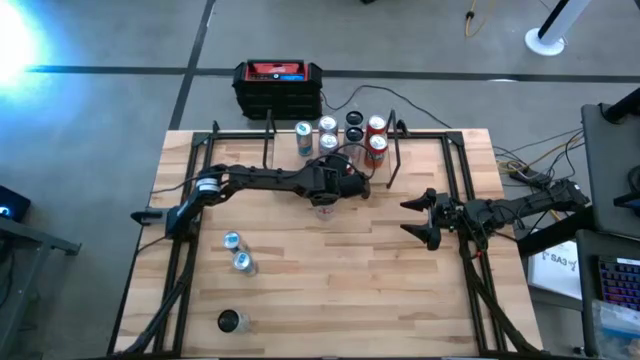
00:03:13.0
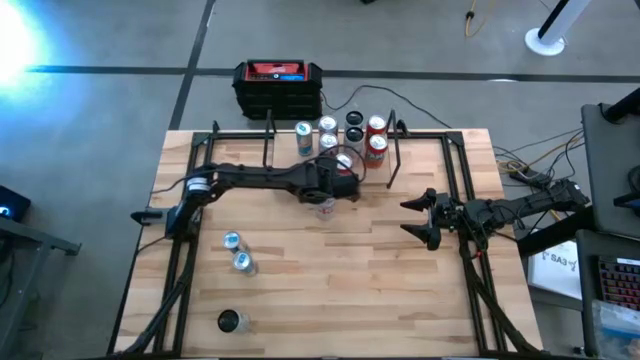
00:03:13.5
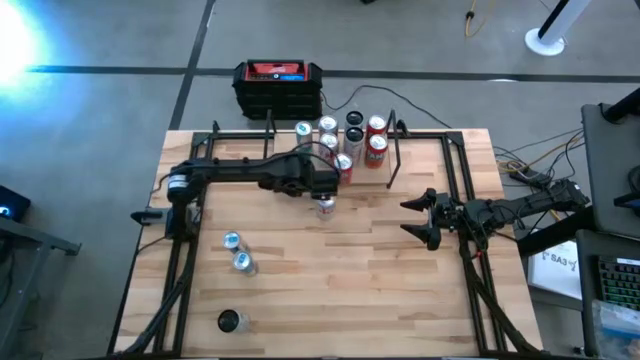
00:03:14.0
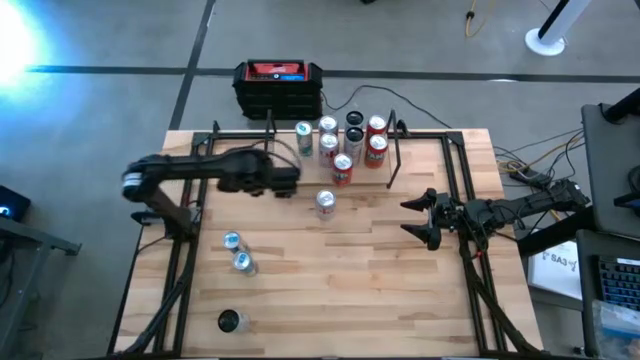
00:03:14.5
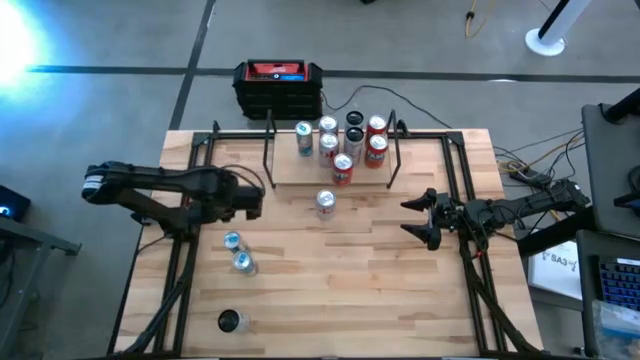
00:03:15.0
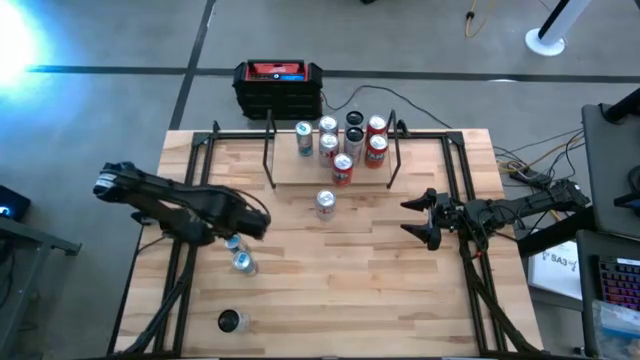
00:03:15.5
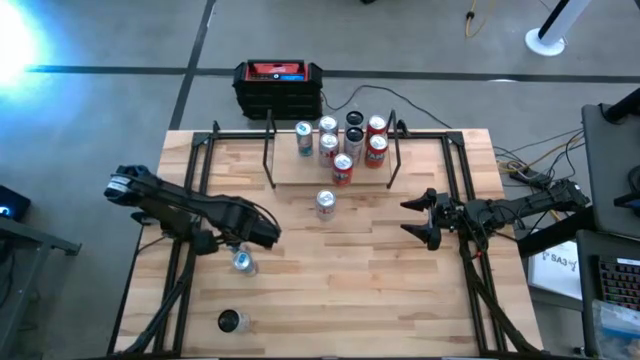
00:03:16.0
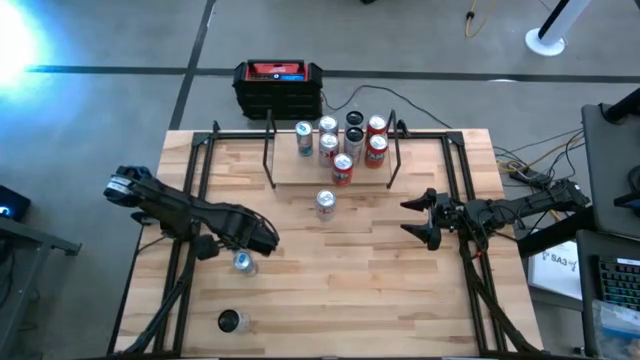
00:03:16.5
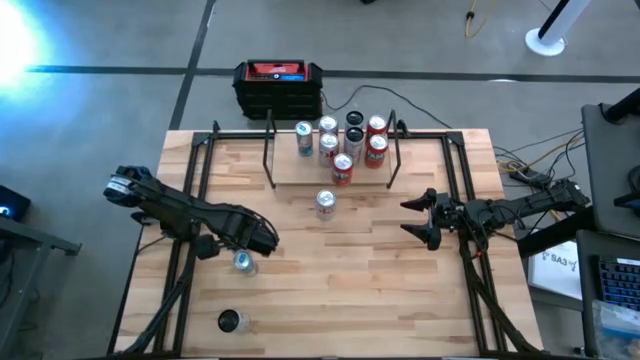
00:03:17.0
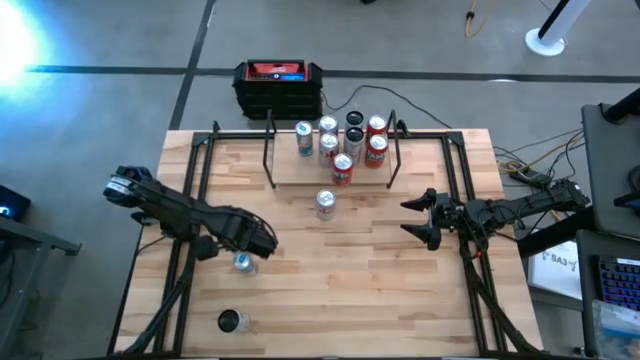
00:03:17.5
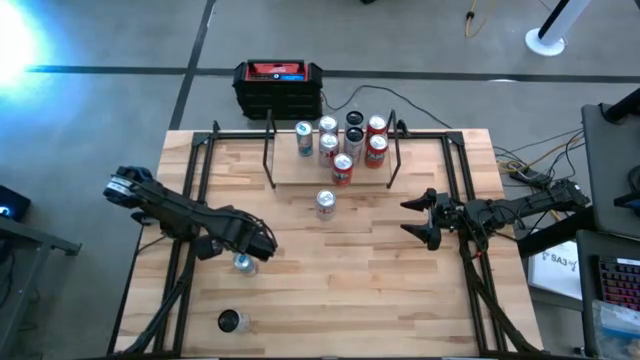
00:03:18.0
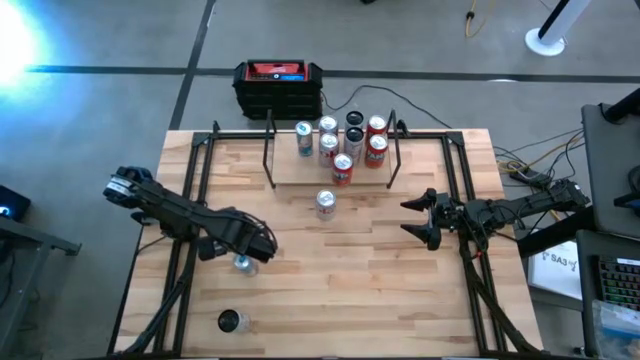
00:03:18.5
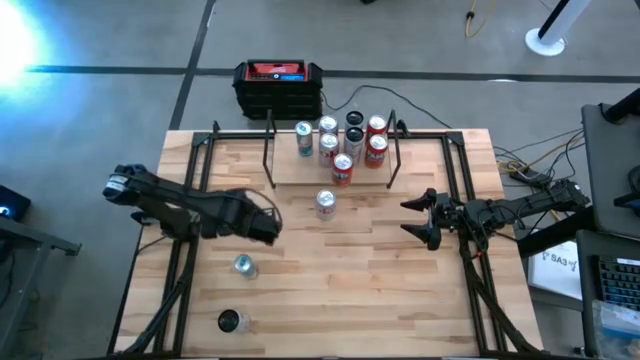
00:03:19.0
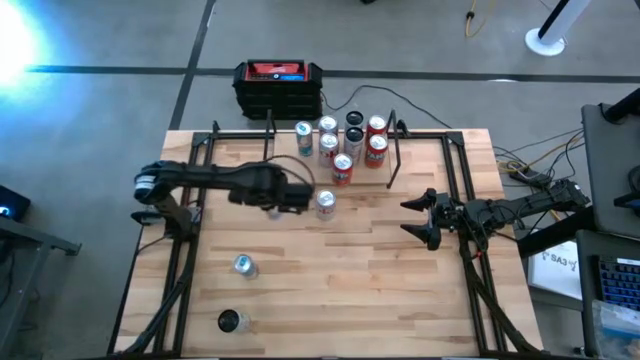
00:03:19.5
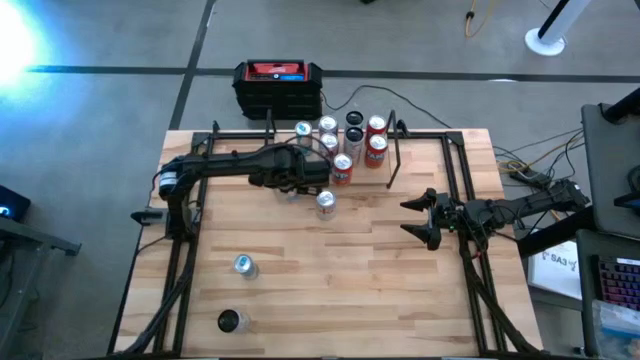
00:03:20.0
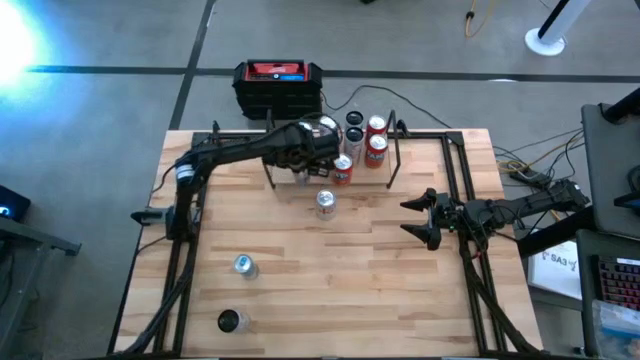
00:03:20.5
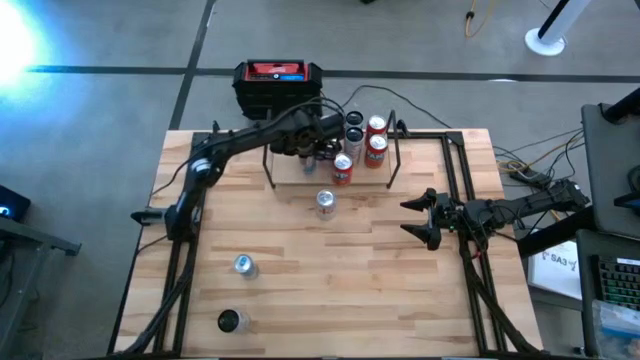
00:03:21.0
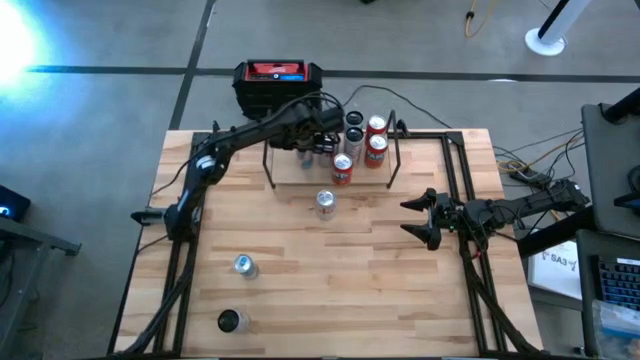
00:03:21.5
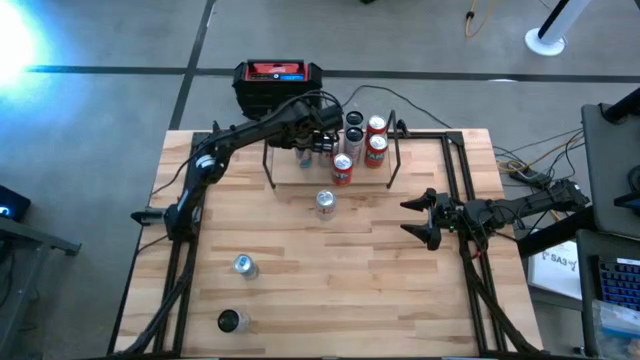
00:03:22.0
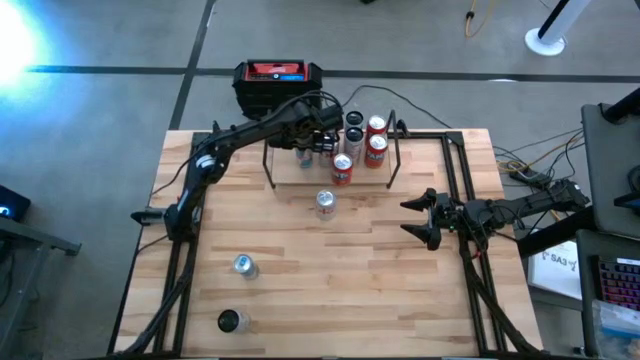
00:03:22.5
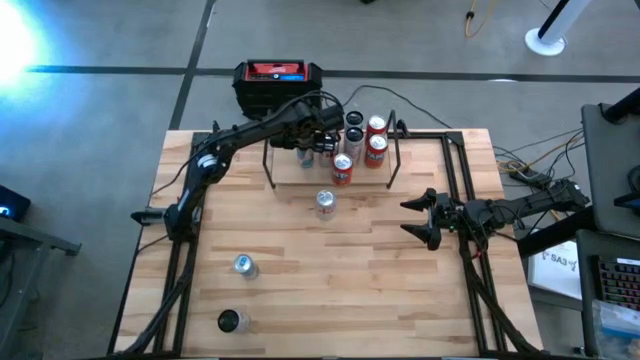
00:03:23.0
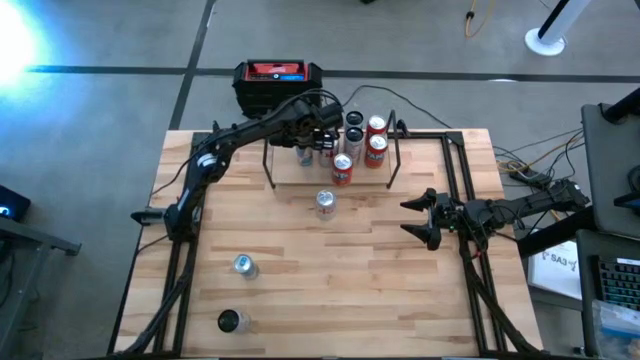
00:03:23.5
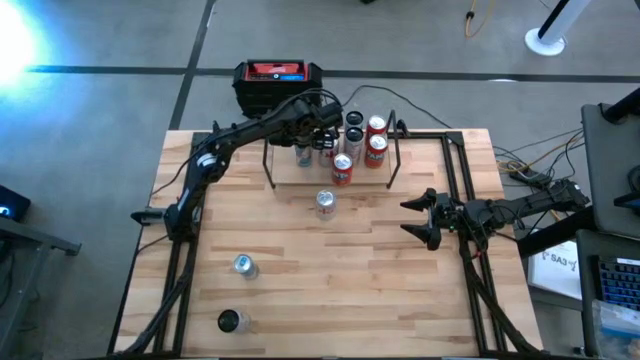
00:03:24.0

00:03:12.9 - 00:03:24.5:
Task: Place canned beverage on shelf
Put the top blue soda can on the shelf aligned with the other blue soda can

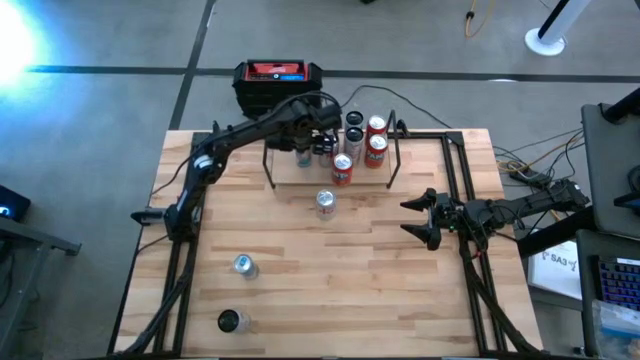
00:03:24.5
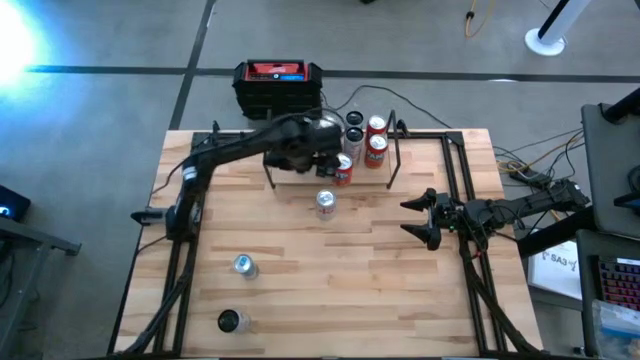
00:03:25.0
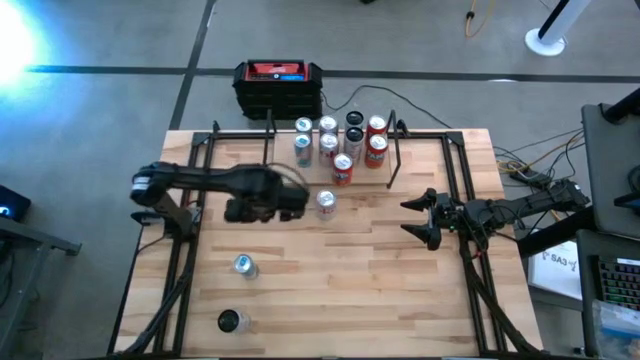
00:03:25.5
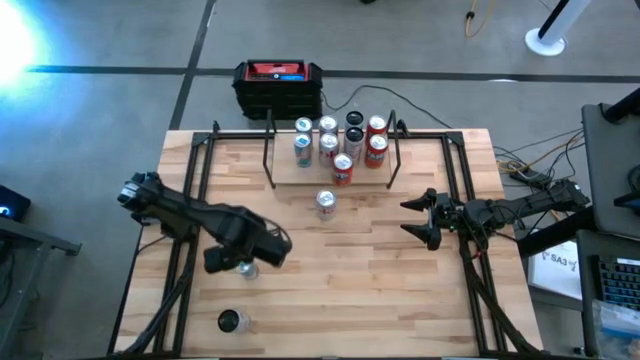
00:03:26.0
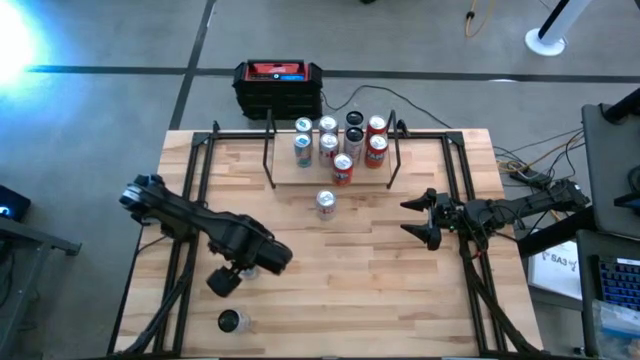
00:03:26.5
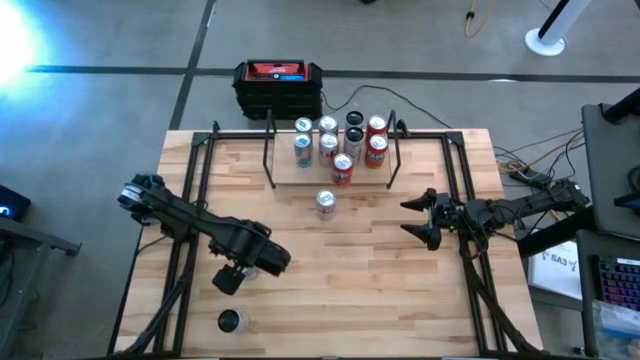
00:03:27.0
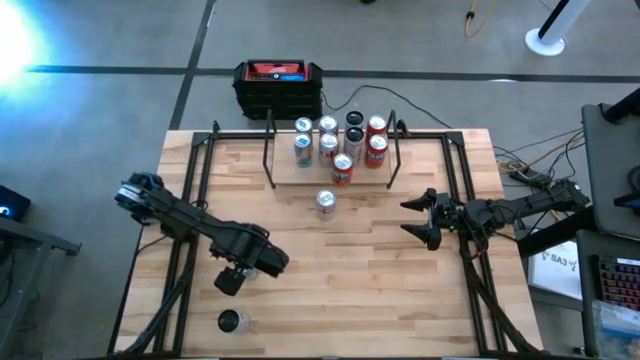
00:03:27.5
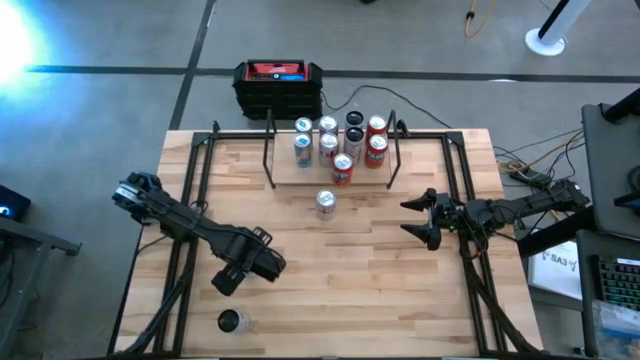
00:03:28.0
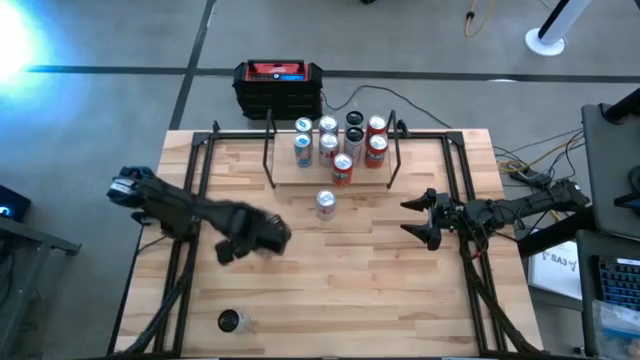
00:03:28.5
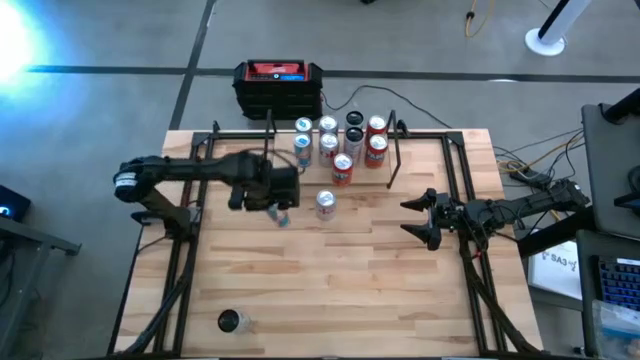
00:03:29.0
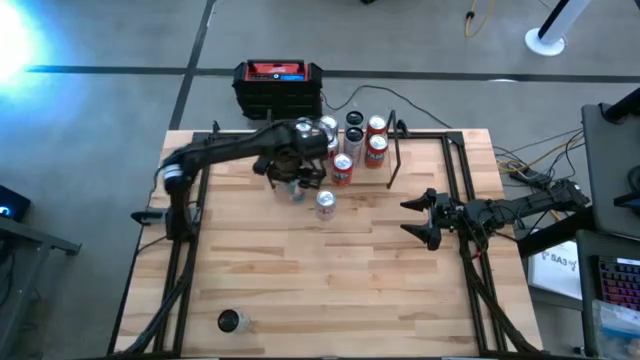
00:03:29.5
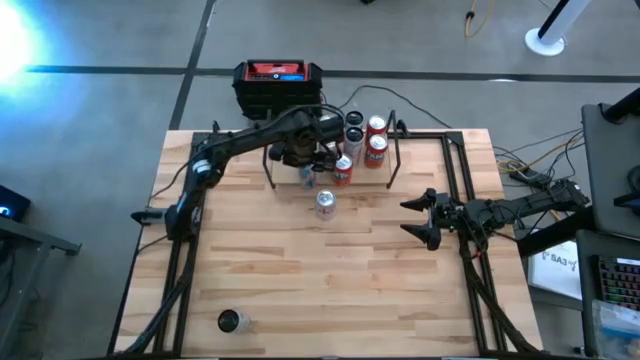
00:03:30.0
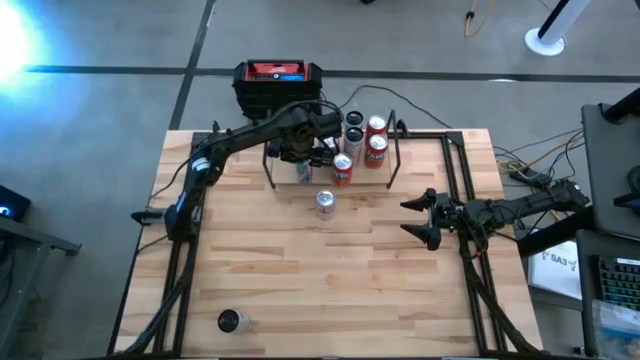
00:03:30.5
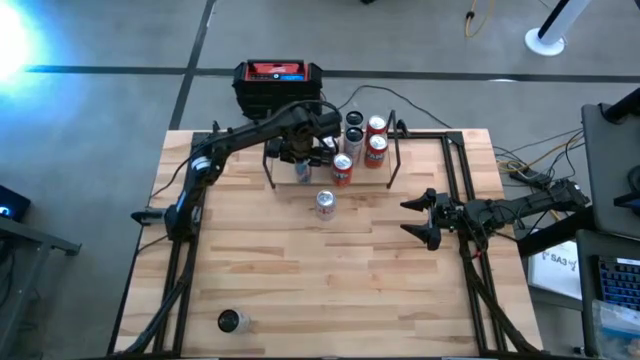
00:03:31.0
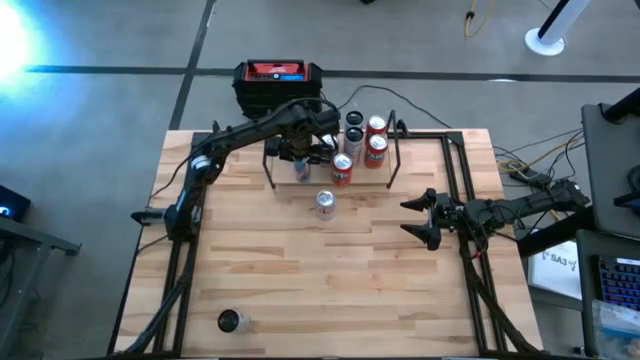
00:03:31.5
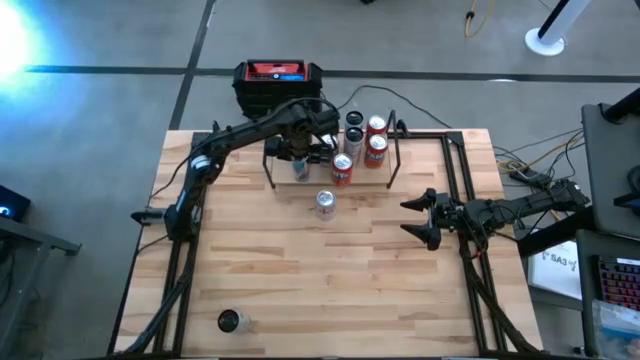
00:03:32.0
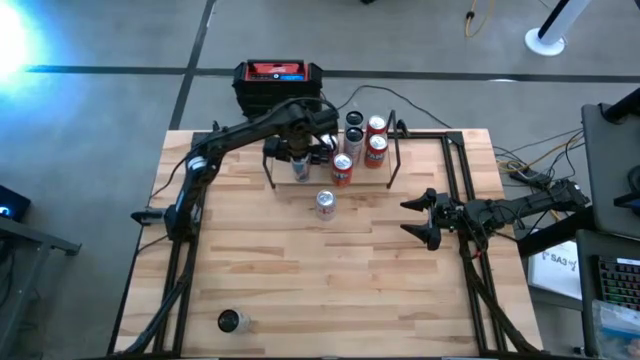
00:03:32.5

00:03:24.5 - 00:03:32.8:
Put the blue soda can on the shelf aligned with the other blue soda can
